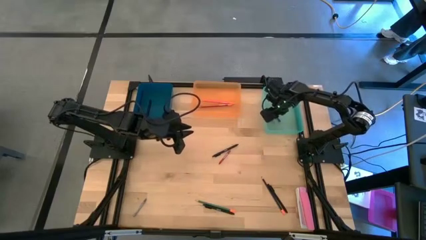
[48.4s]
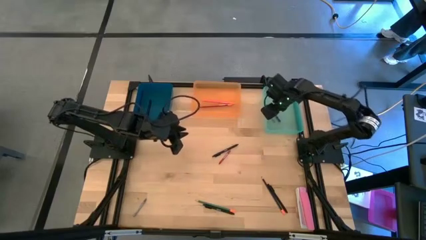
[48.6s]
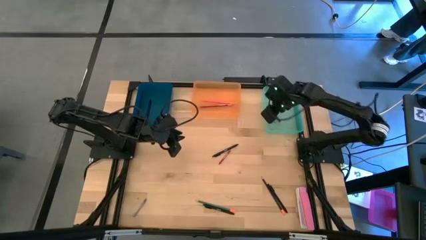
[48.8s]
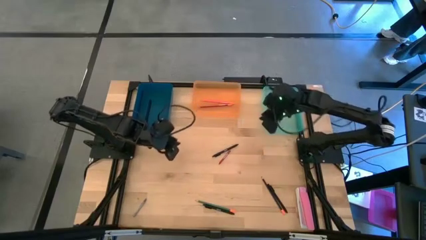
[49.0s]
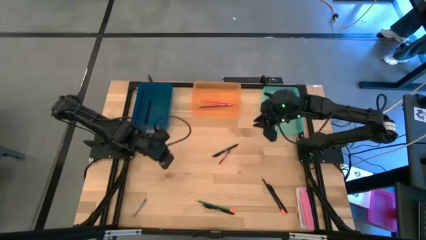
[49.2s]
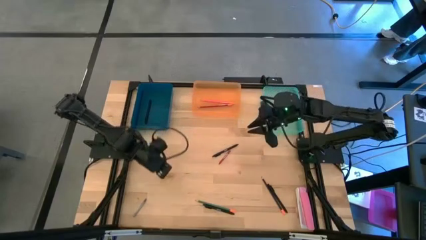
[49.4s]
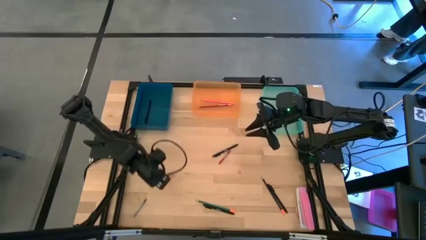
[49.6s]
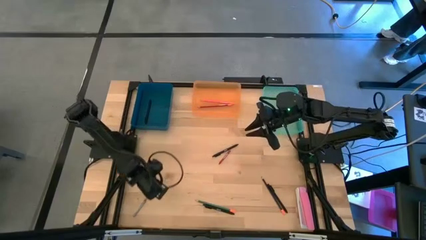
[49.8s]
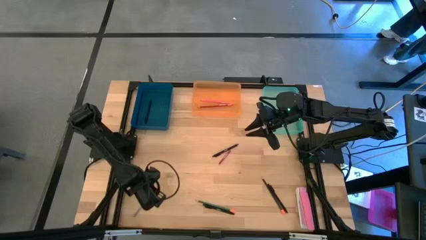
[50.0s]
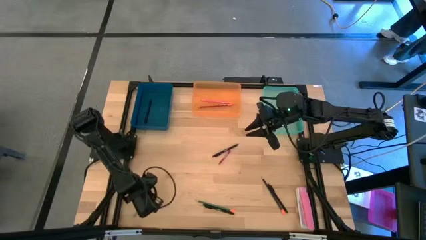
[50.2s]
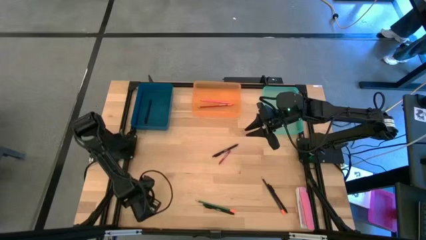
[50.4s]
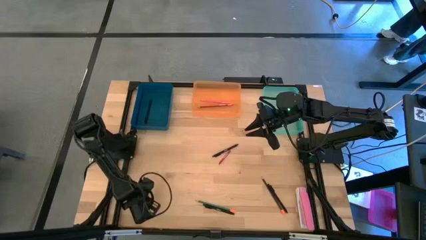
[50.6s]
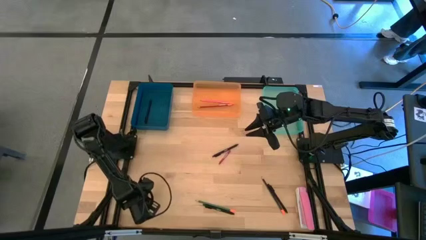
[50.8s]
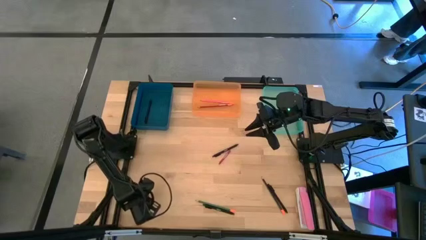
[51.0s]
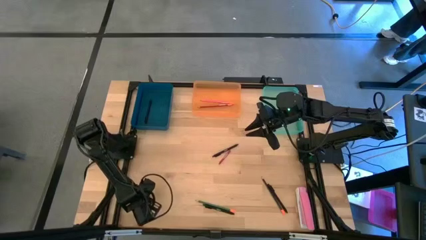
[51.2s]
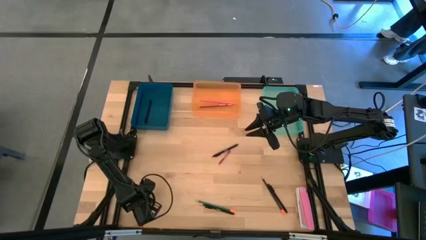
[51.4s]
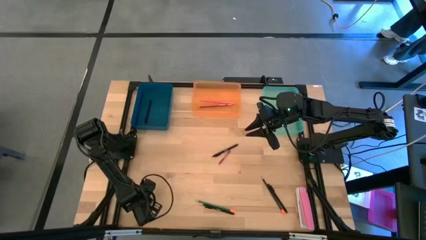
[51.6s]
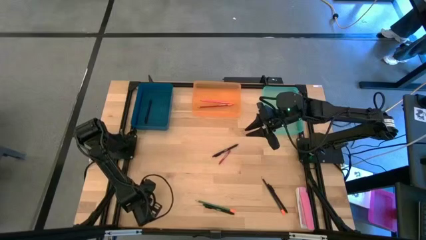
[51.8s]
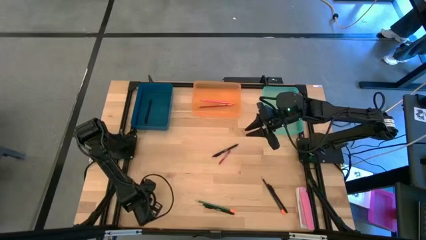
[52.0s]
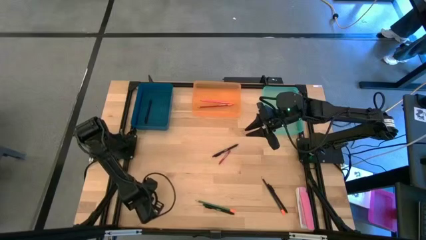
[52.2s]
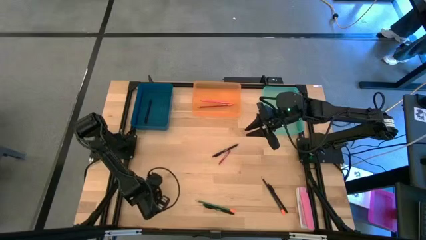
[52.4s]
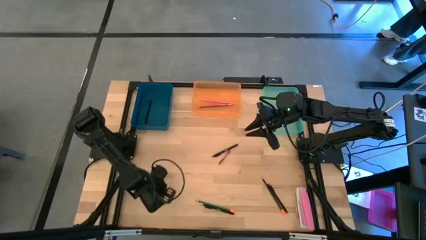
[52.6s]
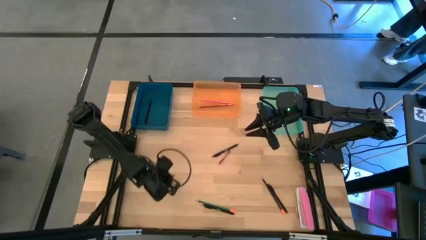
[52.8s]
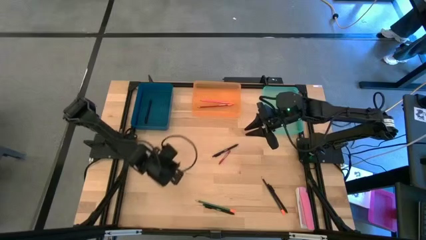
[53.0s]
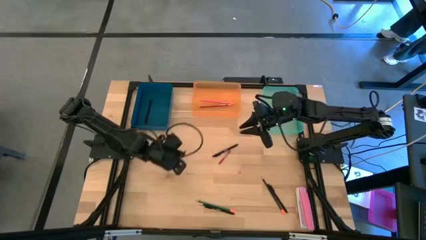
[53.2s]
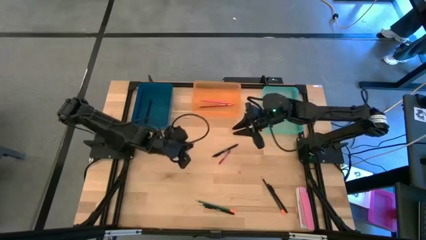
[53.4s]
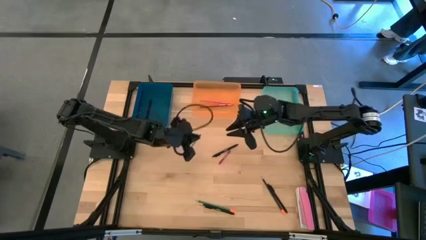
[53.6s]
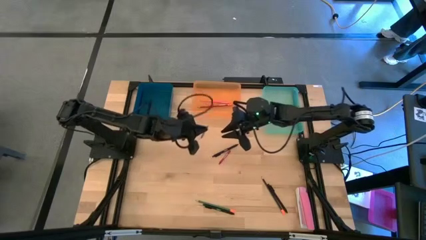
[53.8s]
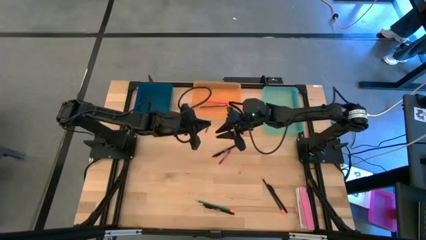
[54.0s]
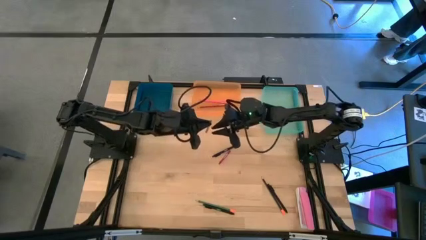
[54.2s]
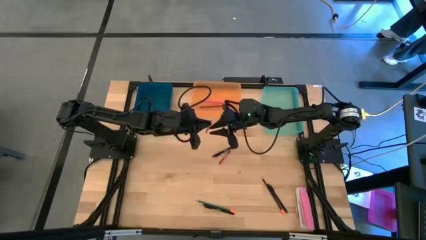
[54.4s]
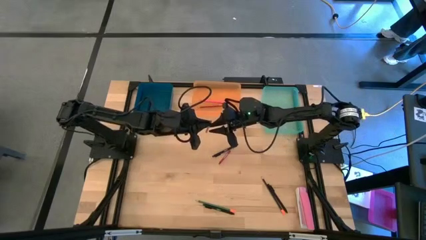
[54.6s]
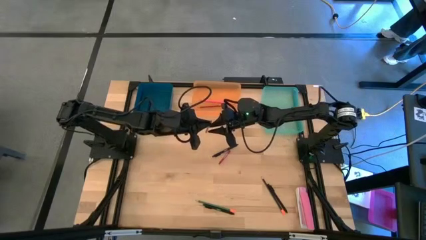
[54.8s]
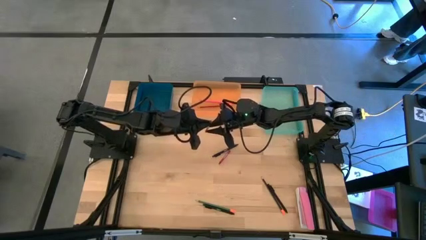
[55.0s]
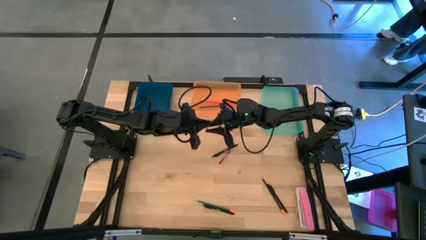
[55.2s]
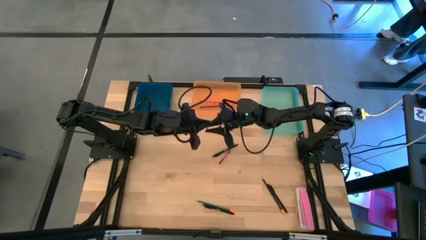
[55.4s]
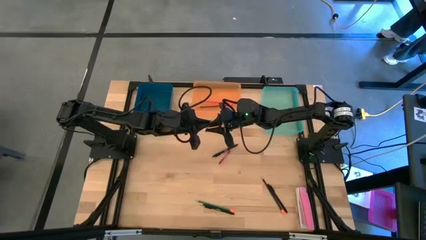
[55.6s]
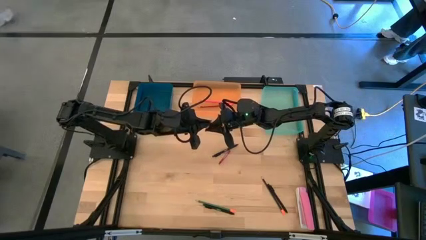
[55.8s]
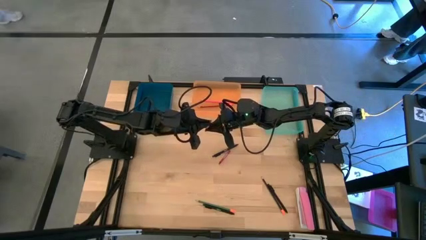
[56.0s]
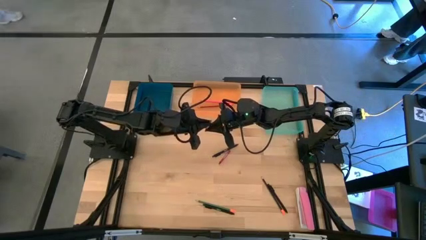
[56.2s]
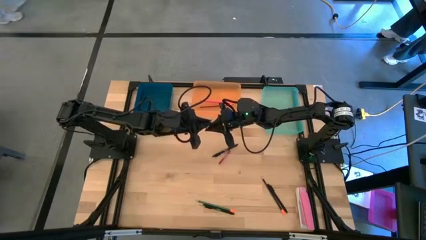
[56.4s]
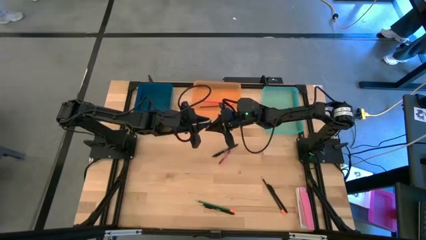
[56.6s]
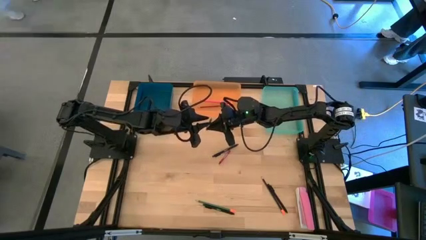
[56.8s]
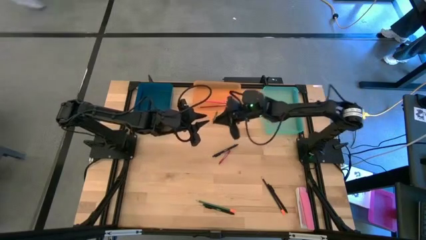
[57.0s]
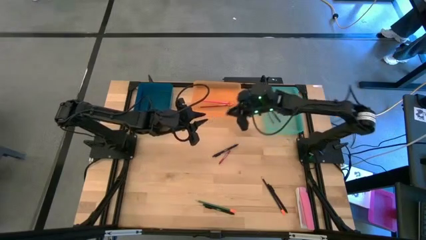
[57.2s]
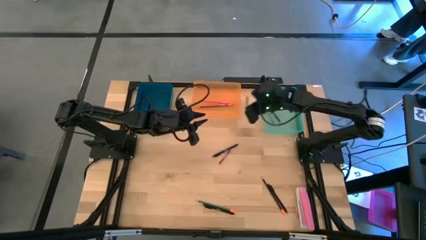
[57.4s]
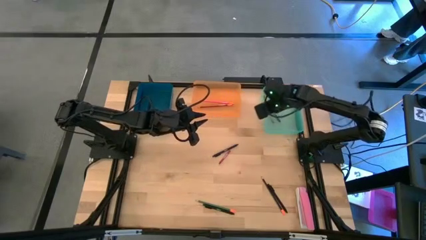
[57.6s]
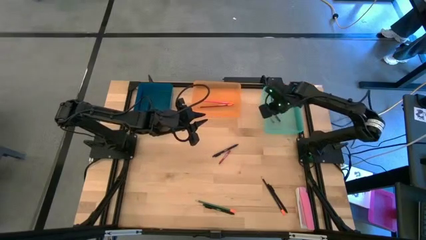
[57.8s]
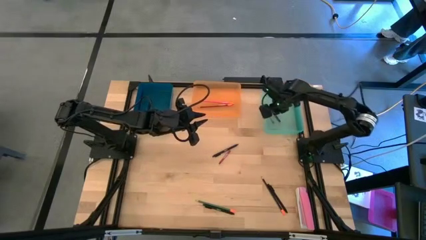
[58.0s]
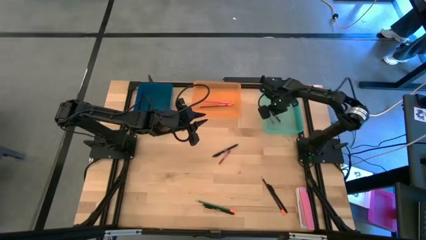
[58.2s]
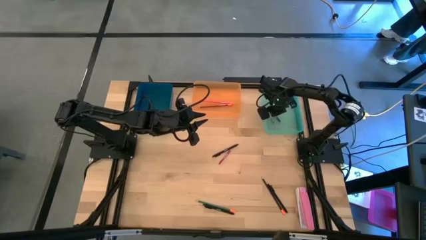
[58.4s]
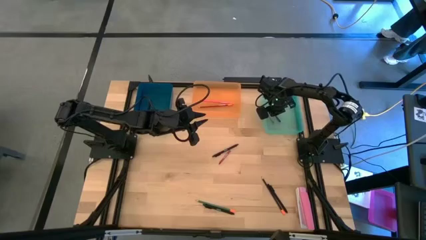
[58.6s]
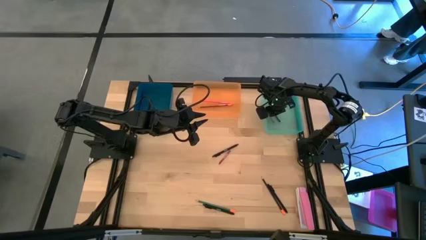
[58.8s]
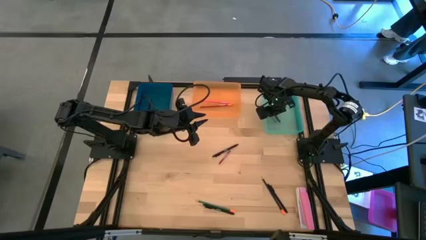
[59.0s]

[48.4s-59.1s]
Task: Sort crayons/erasers/pens/pencils in bins
Put the gray crayon into the blue bin

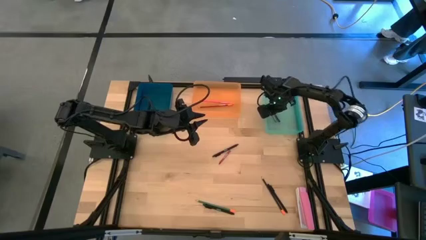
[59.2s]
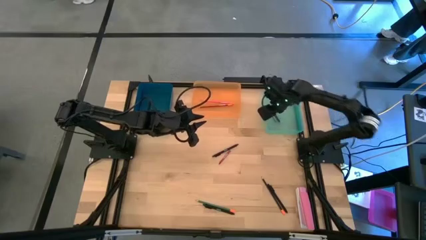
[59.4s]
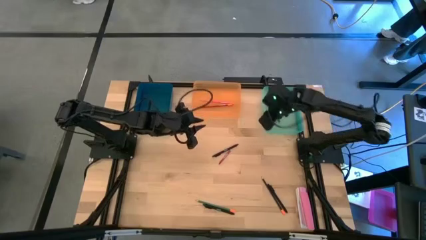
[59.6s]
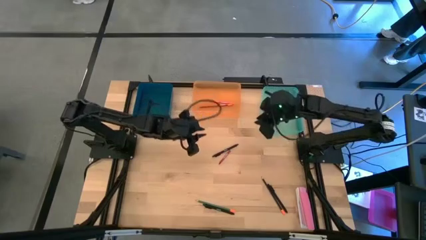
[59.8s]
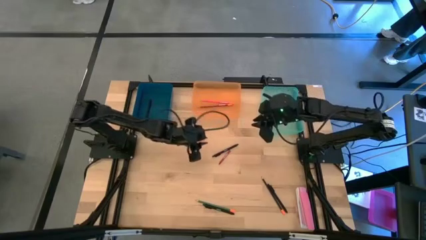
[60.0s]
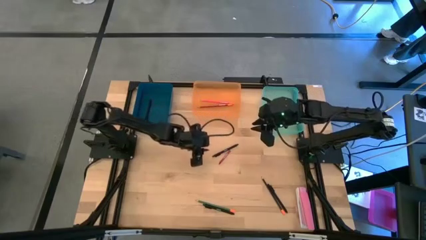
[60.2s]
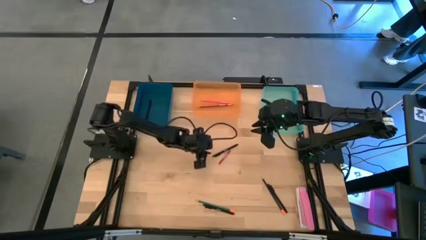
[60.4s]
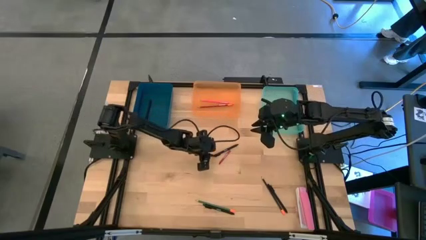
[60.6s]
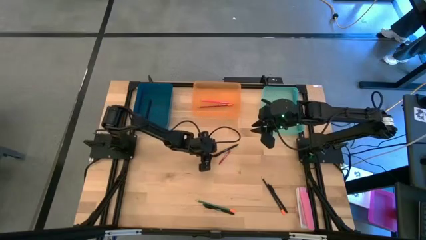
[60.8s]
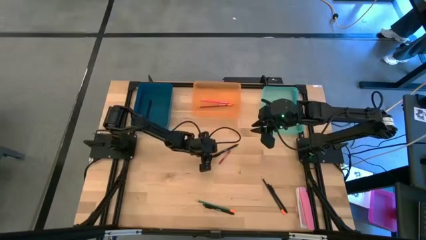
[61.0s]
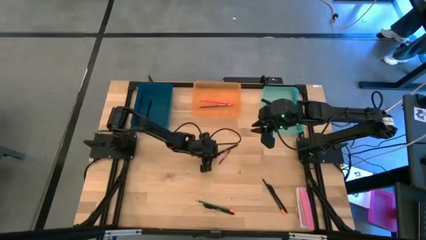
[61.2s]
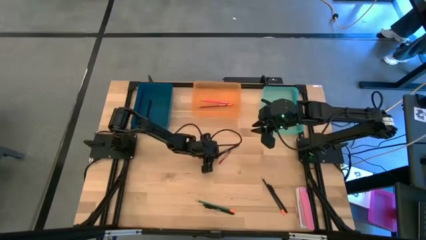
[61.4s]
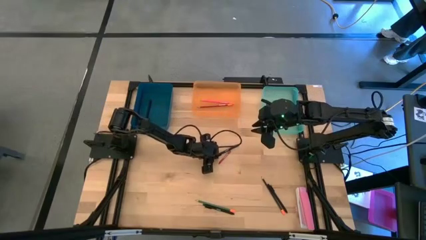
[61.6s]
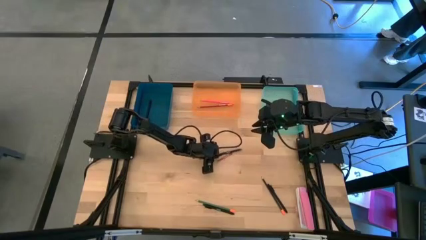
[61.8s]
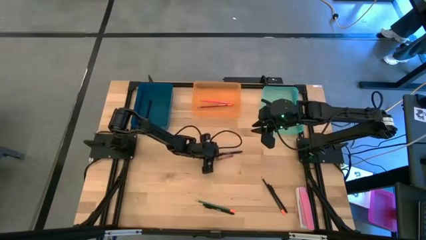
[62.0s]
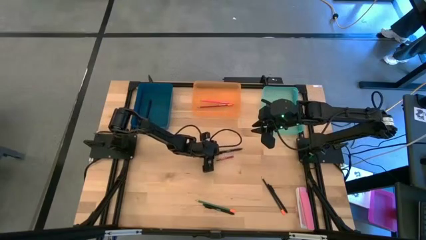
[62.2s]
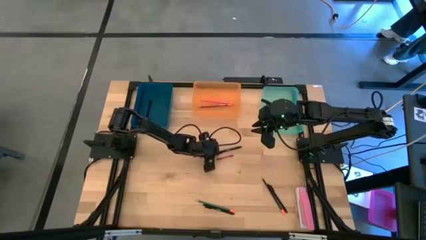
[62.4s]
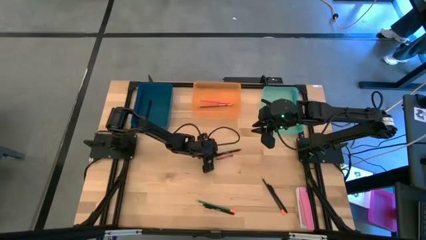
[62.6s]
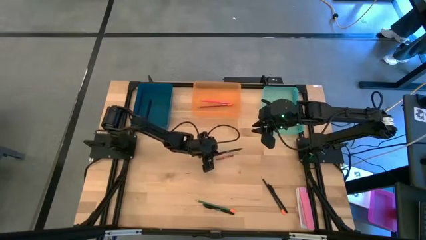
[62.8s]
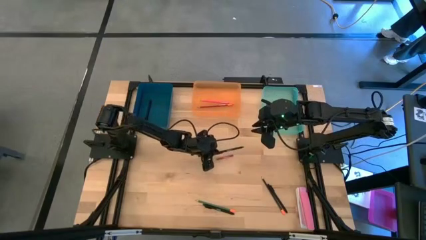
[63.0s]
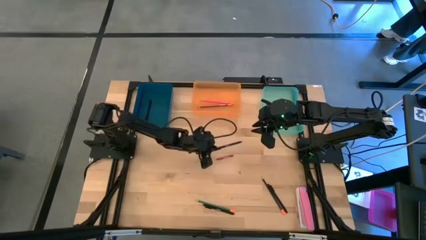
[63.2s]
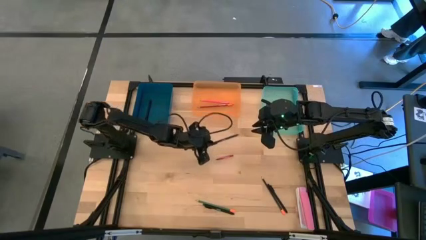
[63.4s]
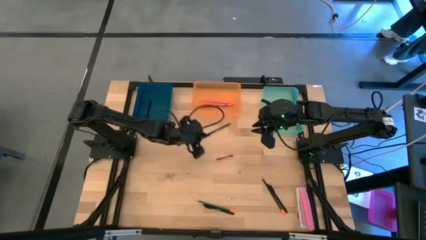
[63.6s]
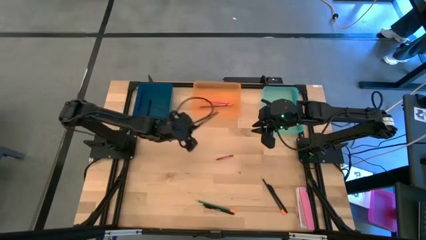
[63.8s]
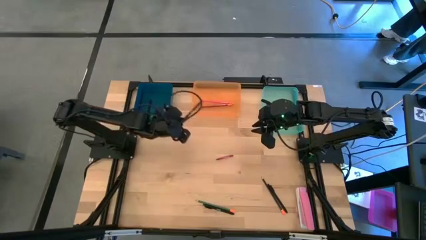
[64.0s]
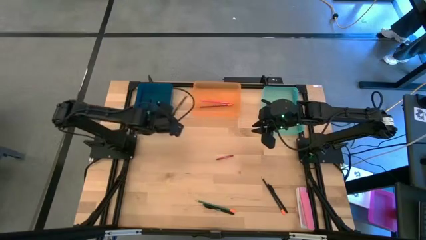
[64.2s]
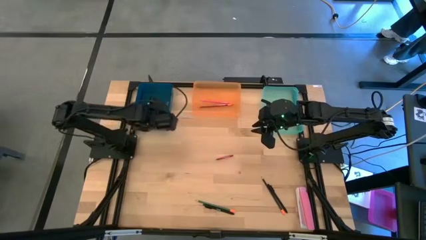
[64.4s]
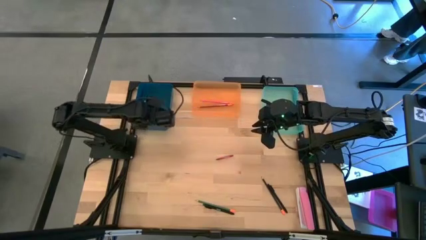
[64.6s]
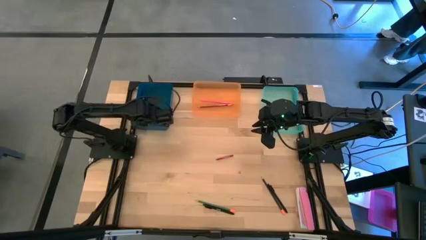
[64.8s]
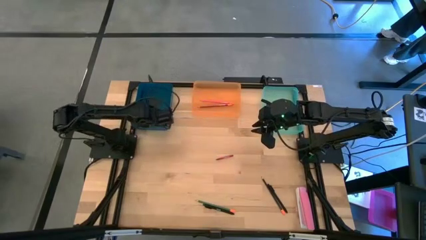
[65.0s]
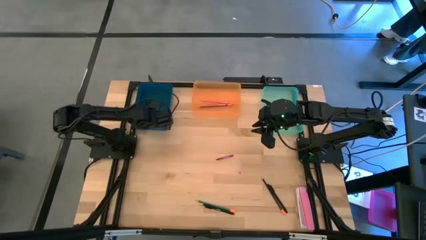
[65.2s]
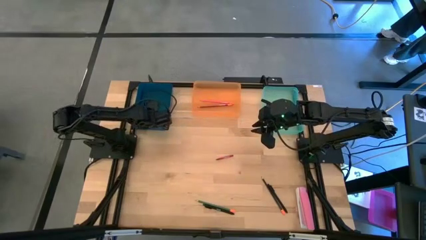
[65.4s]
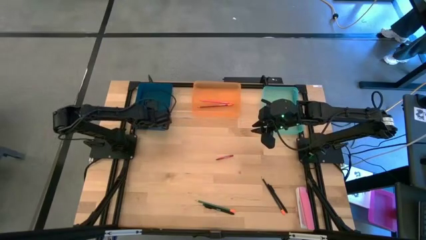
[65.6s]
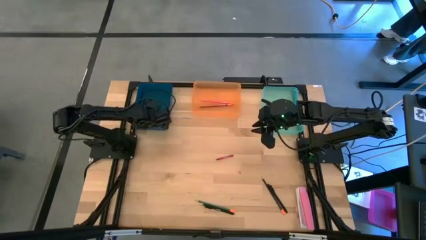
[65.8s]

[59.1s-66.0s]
Put the black pen into the blue bin
